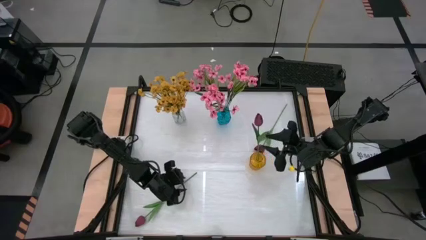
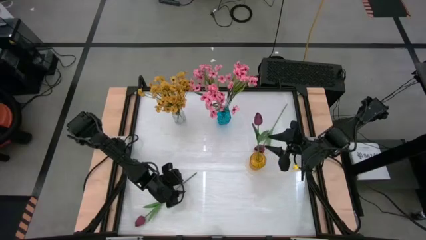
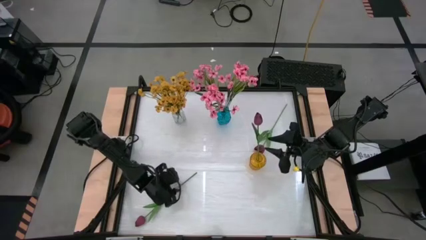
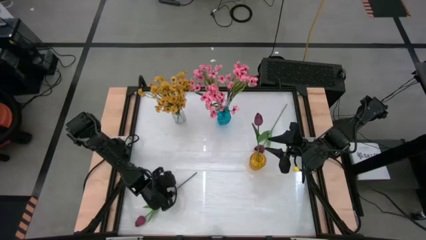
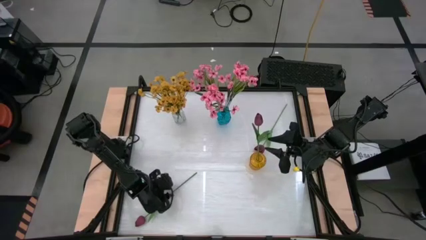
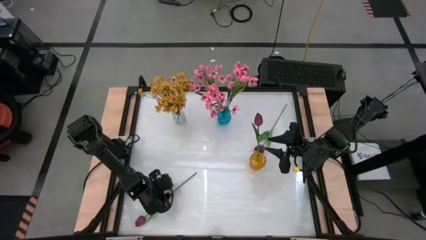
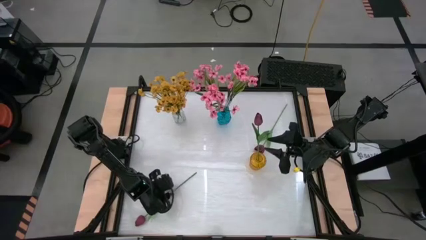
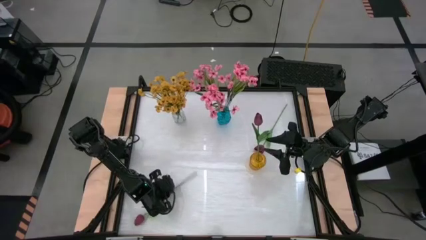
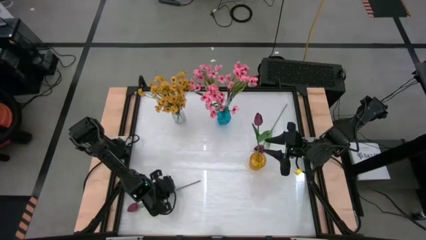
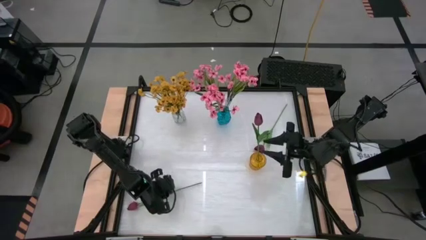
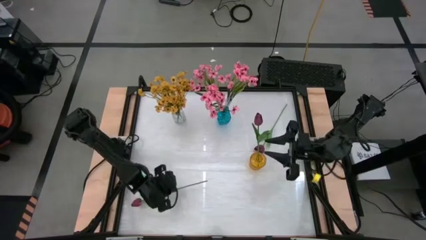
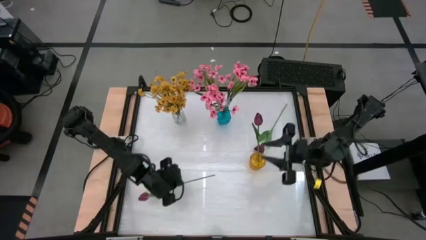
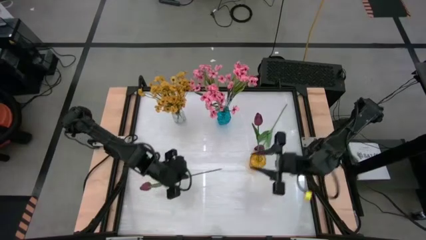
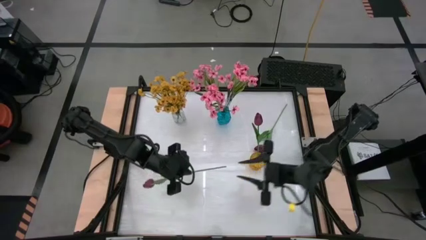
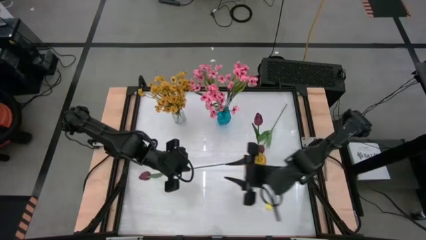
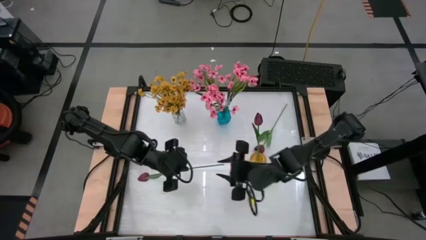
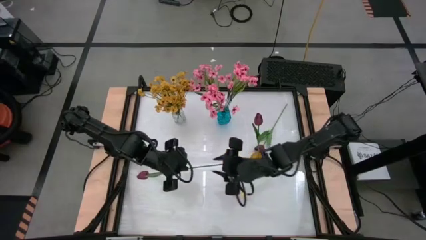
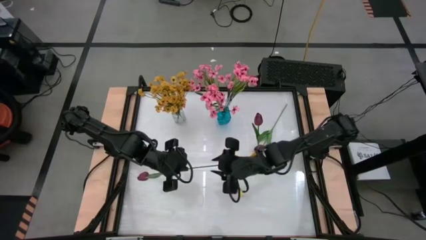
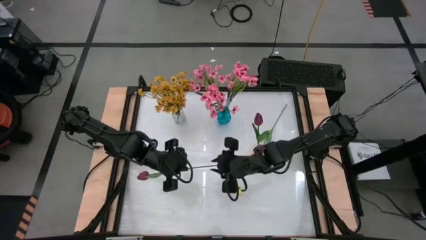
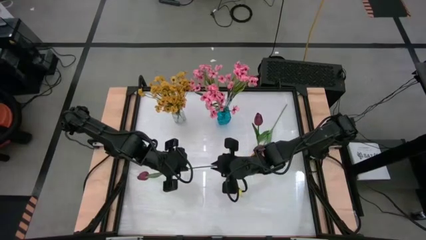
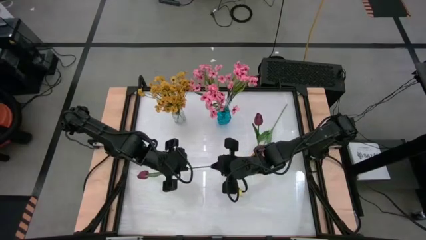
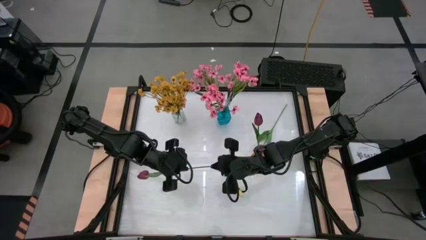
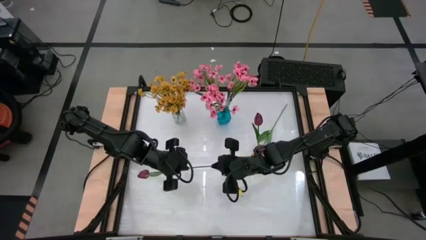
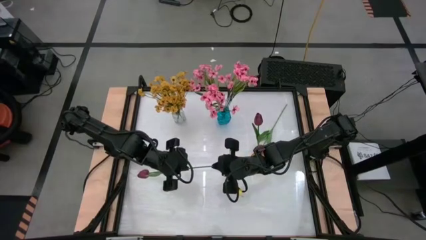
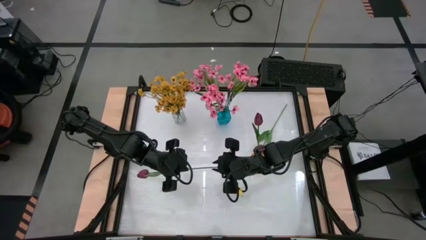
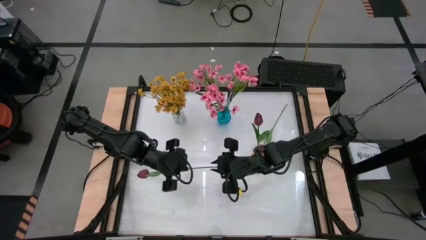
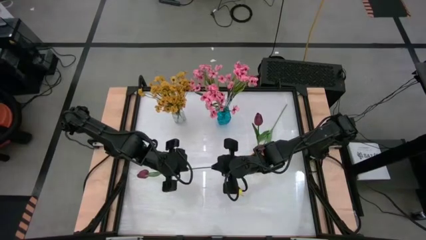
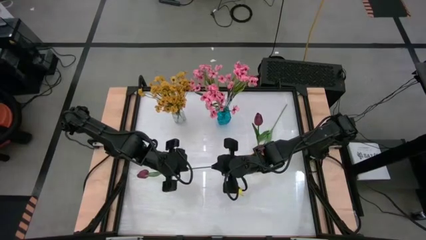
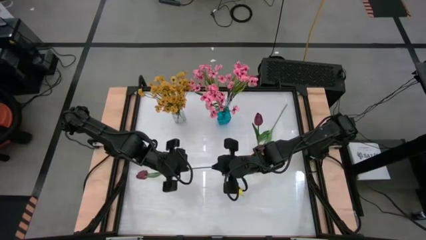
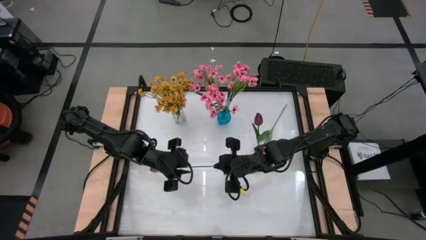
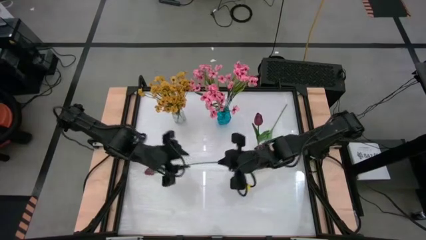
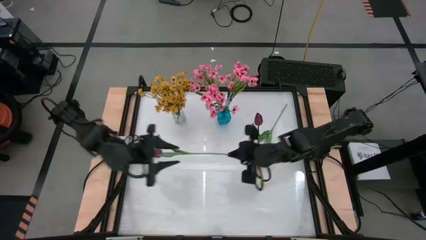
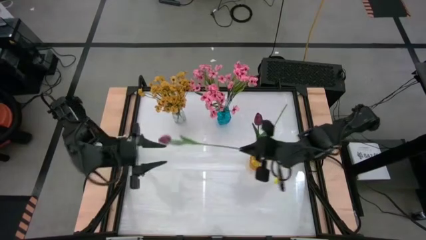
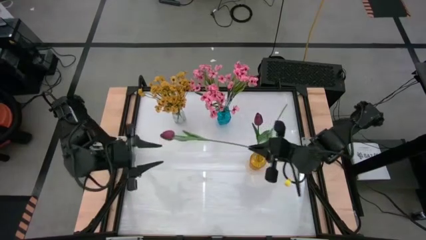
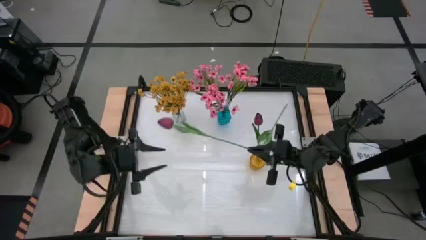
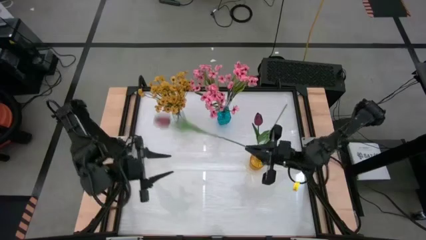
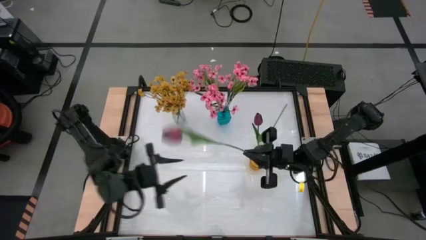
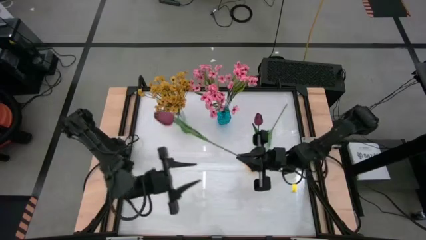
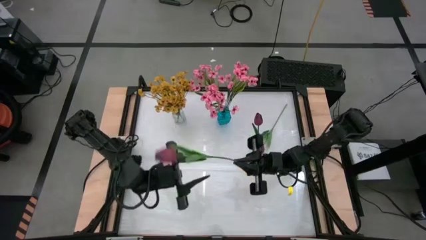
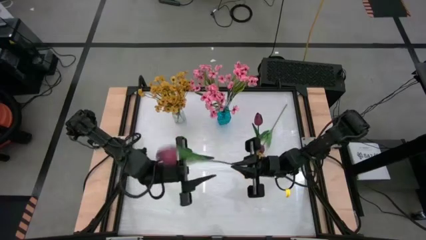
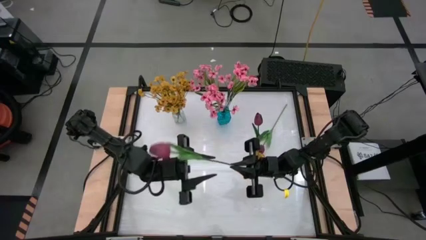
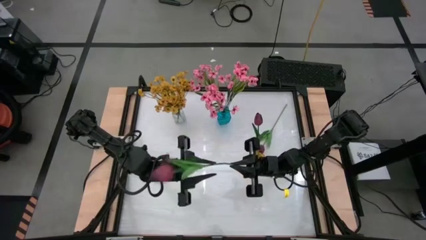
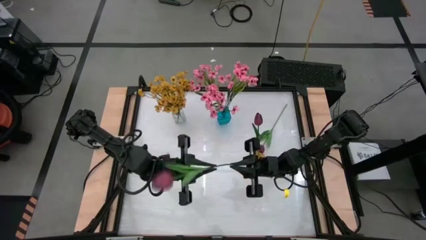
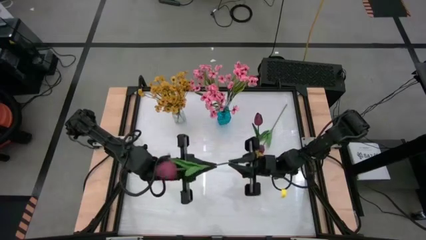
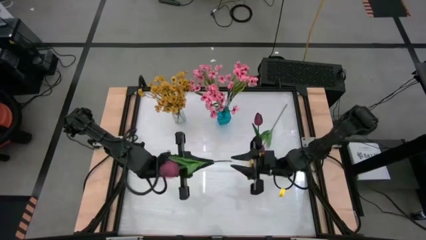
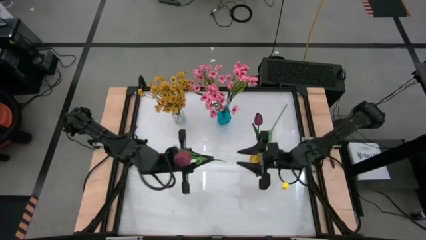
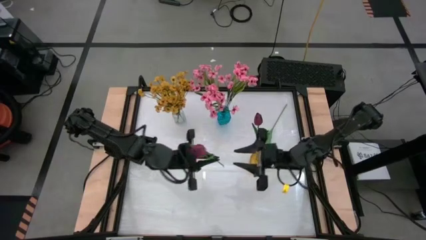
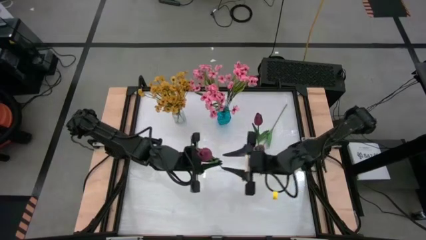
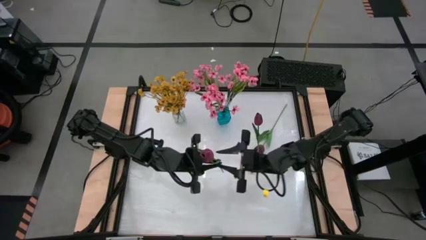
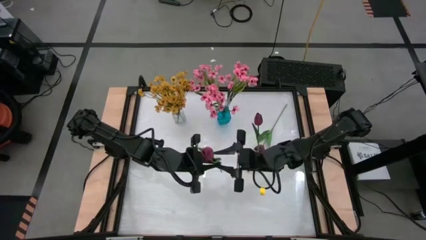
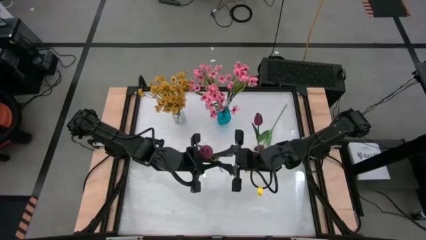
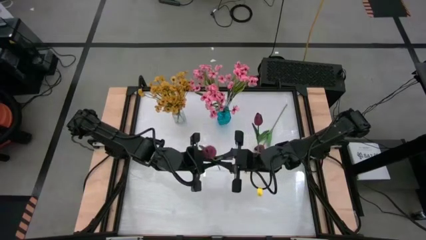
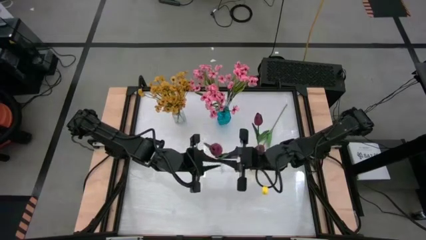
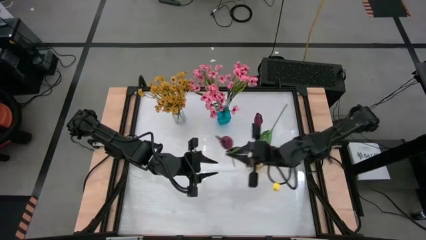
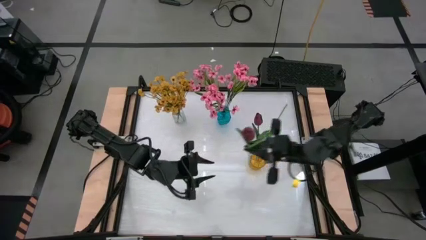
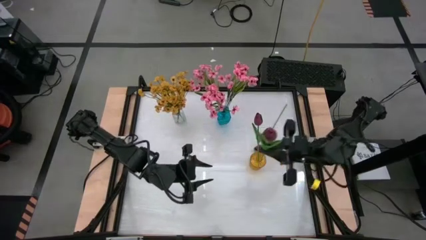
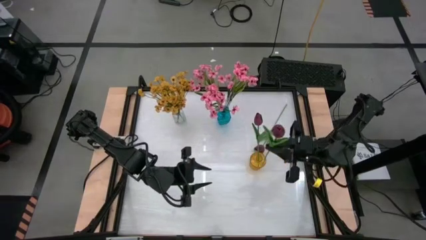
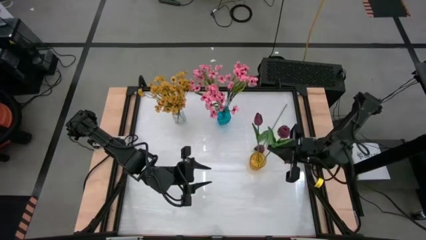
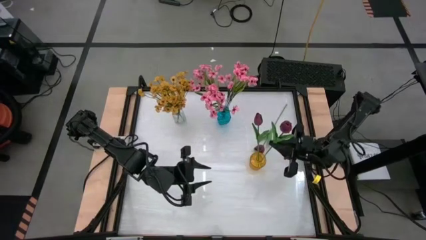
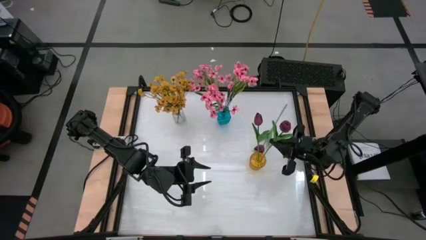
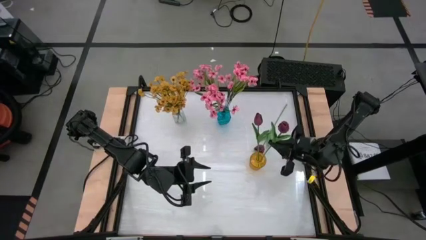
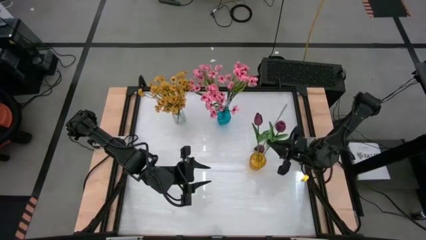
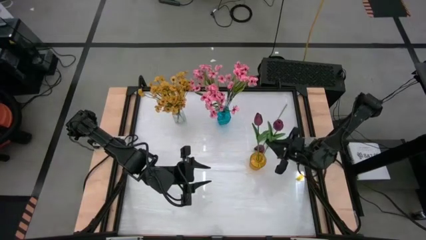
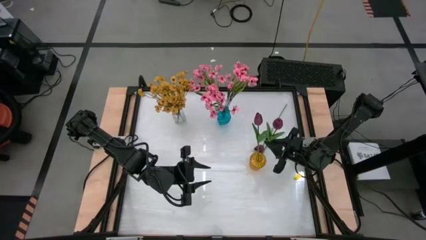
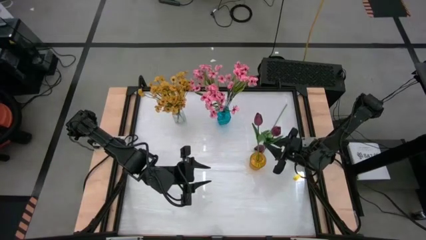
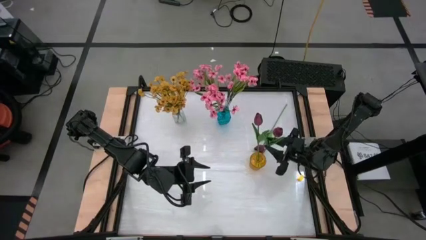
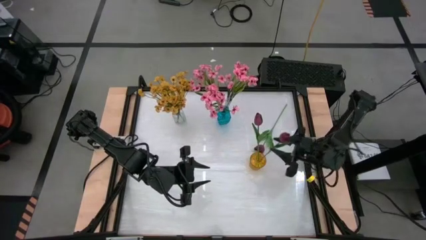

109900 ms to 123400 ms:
Task: Sort flowers into vase by color
Put the bottom red flower into the yellow vase
